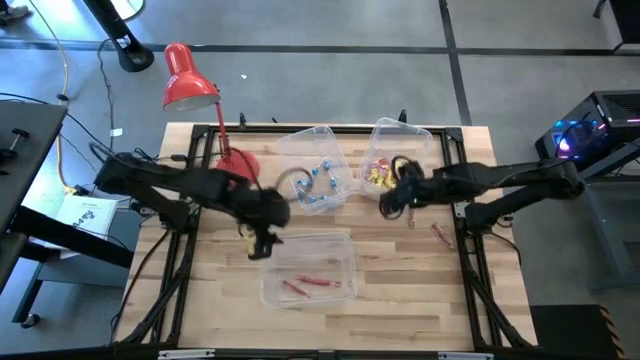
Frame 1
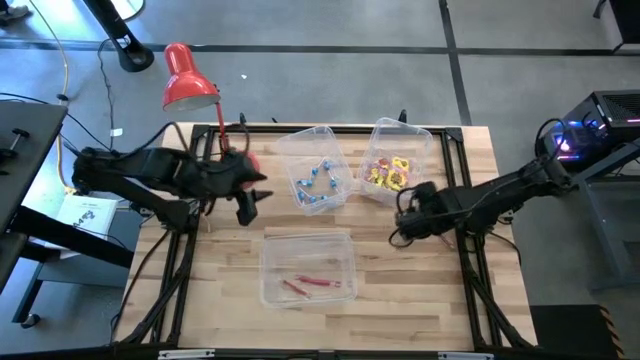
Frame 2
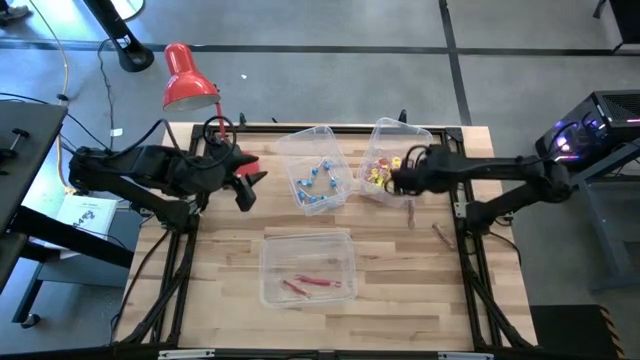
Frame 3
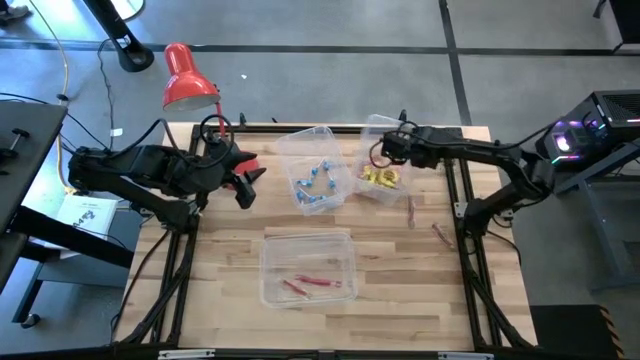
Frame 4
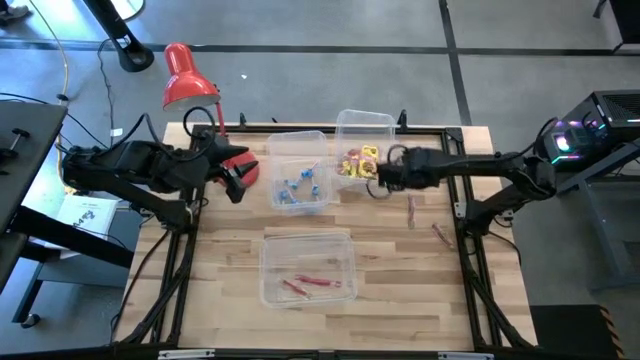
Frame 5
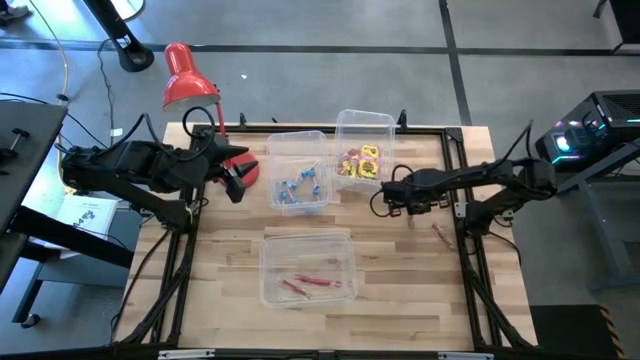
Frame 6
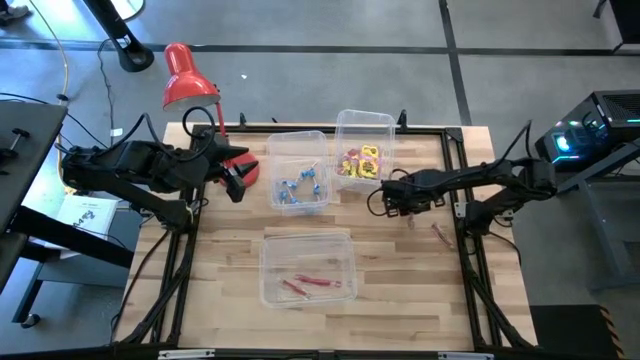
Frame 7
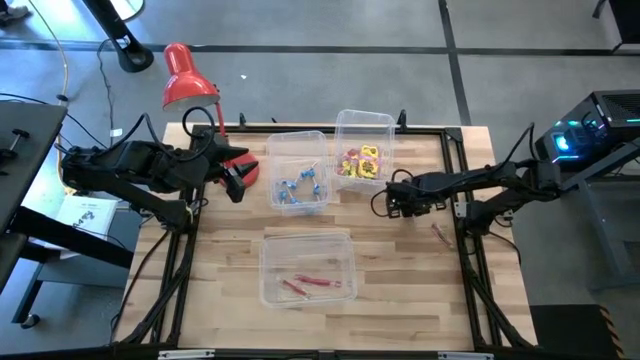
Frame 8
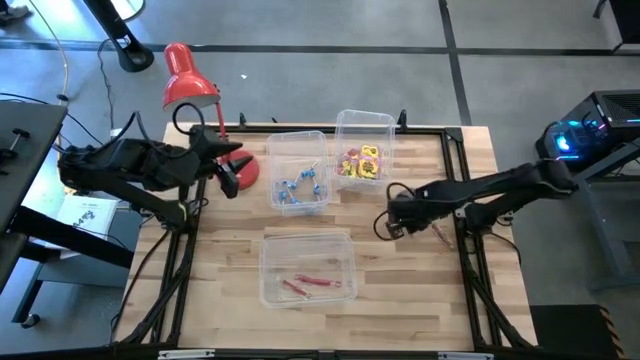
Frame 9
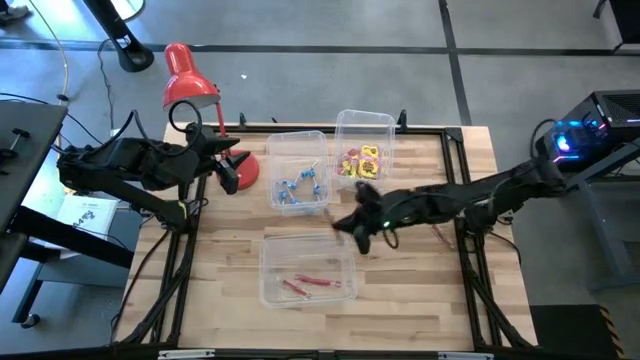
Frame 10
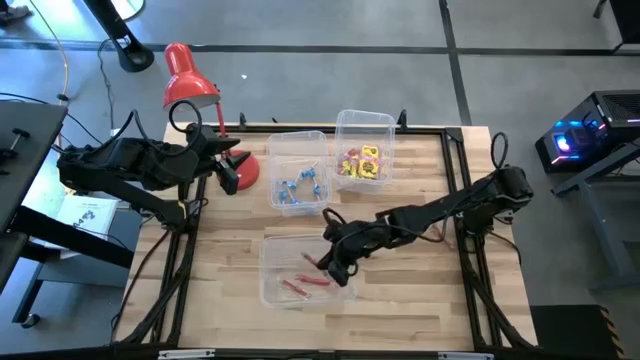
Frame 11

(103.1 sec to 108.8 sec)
Task: Sort candy
Put the red gummy into the bottom transparent bin

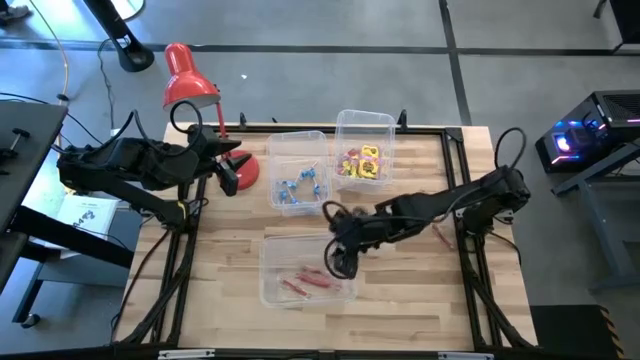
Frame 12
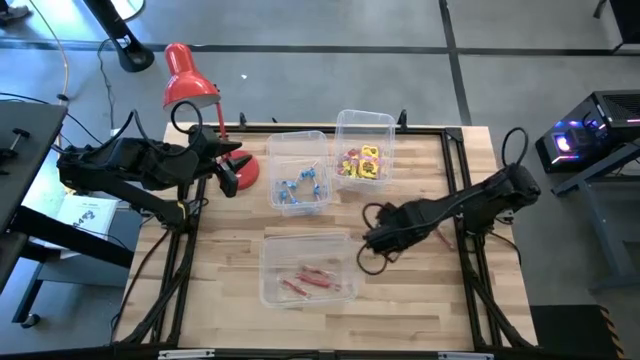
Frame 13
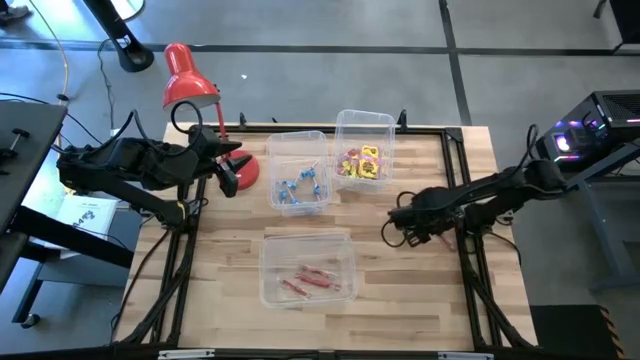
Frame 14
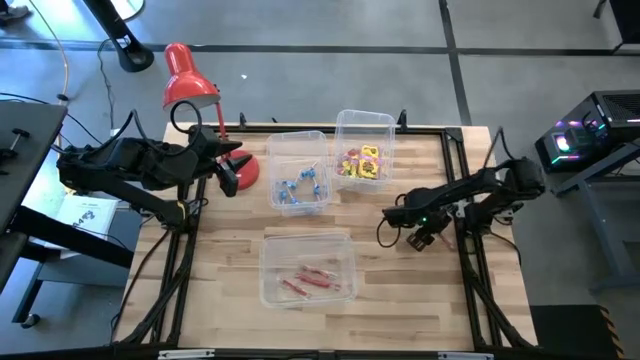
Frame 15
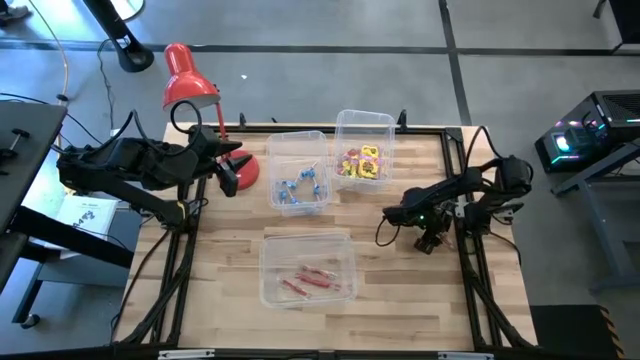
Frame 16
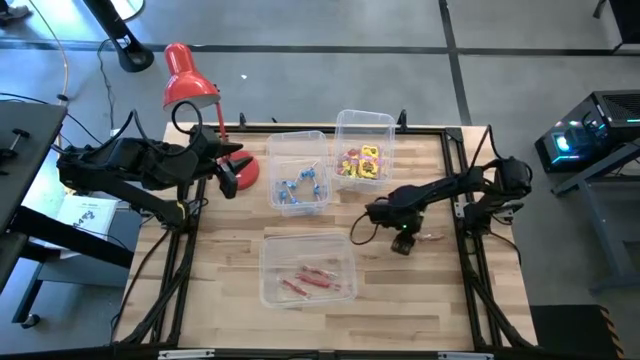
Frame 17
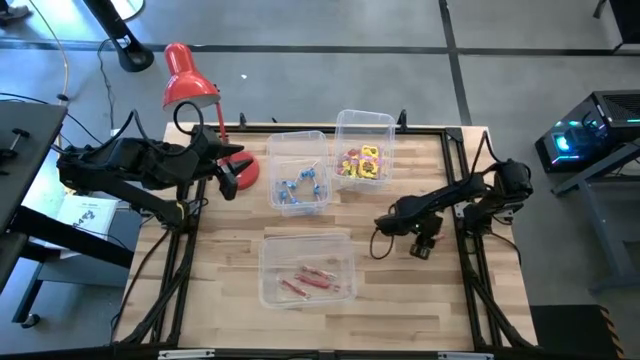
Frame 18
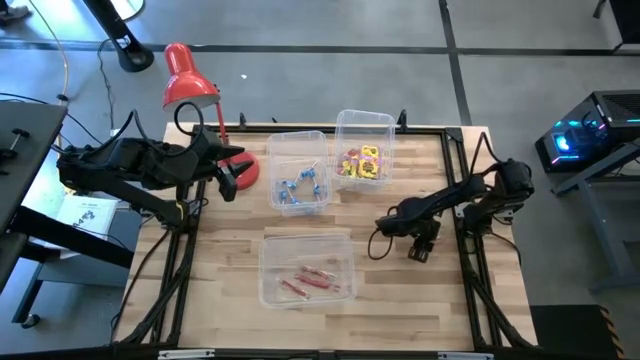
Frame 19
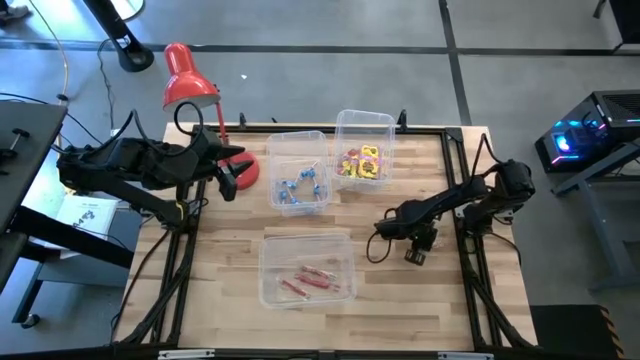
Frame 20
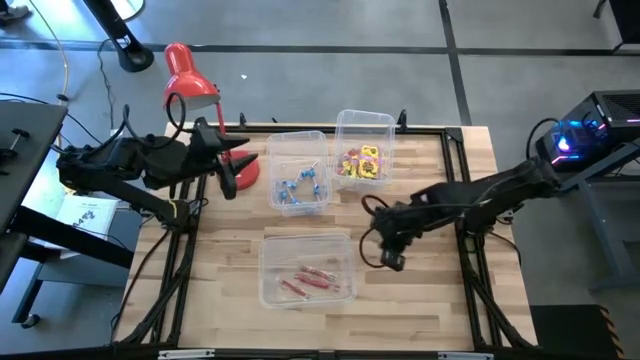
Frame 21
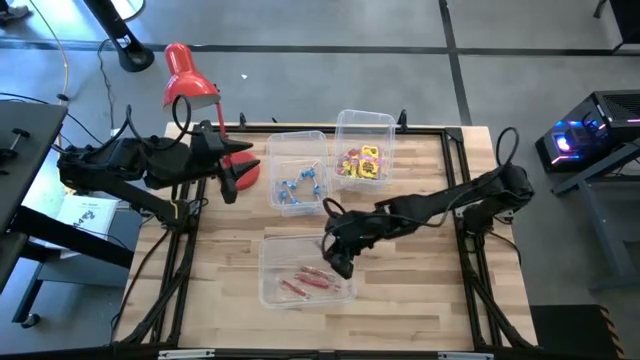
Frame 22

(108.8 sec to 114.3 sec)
Put the red gummy into the bottom transparent bin

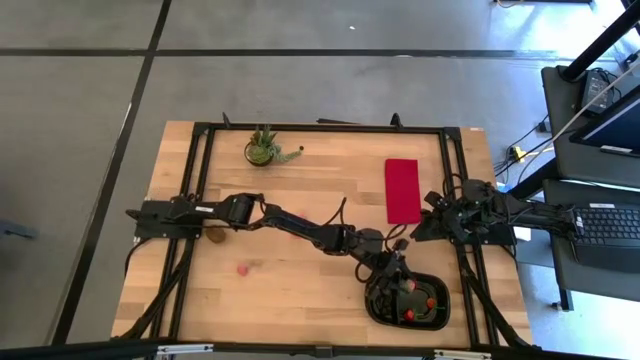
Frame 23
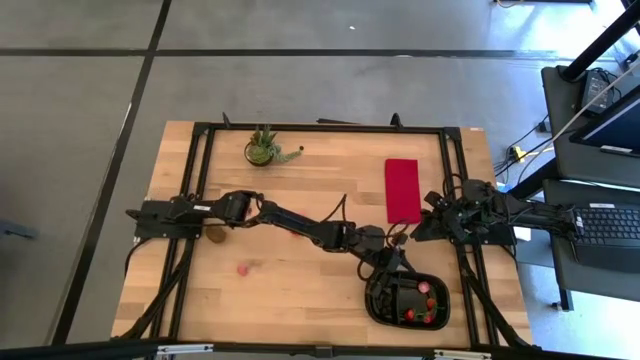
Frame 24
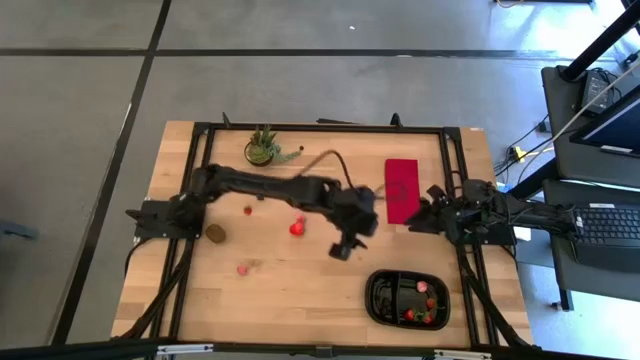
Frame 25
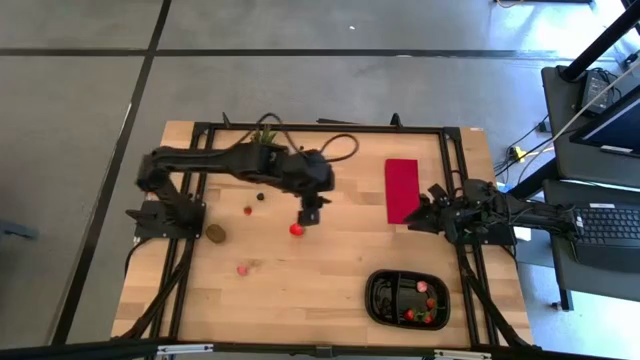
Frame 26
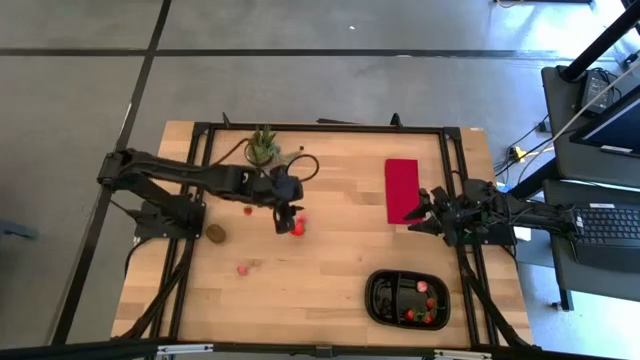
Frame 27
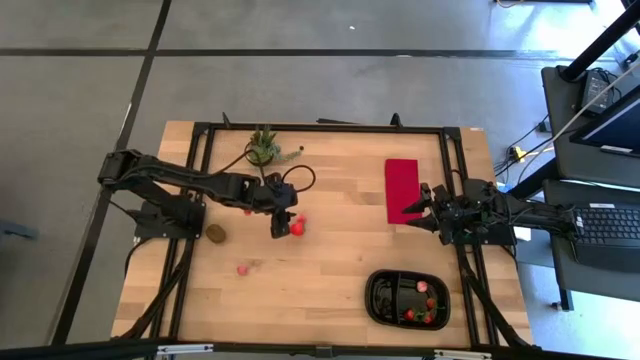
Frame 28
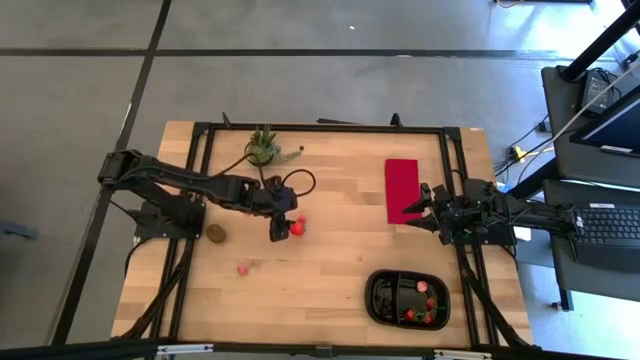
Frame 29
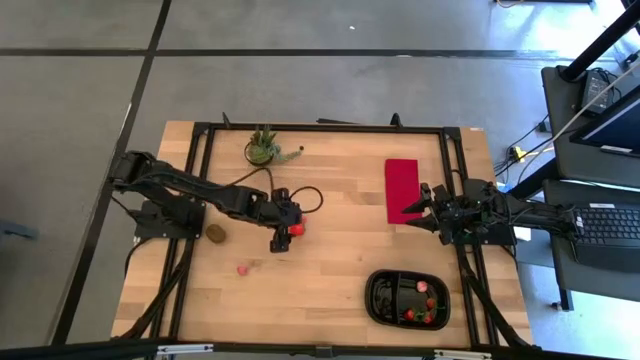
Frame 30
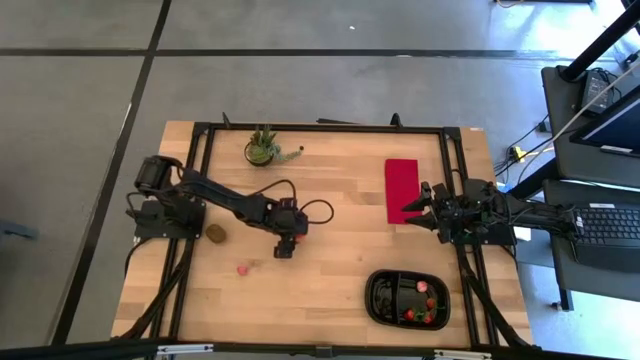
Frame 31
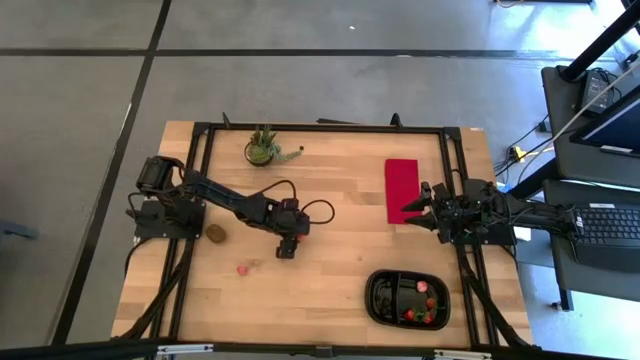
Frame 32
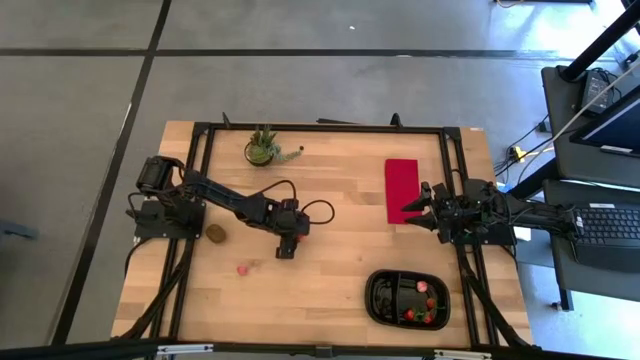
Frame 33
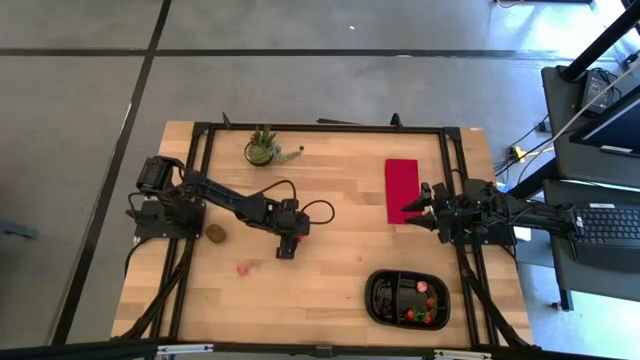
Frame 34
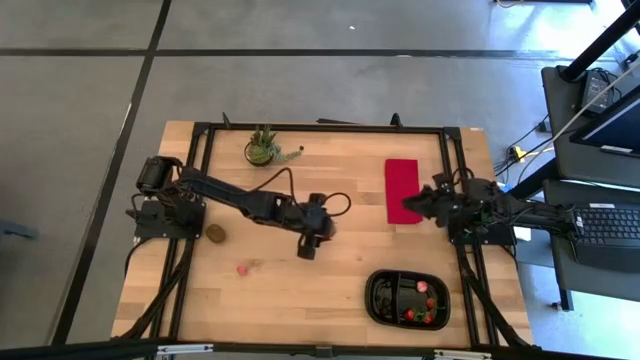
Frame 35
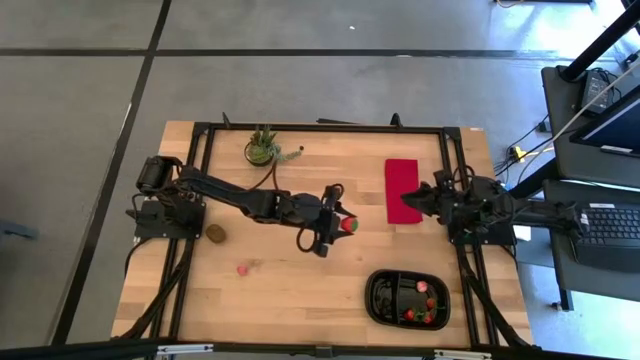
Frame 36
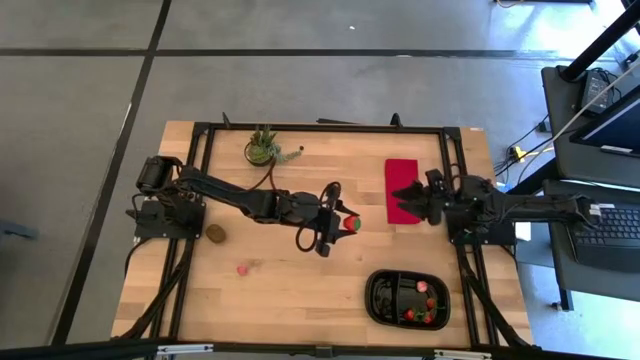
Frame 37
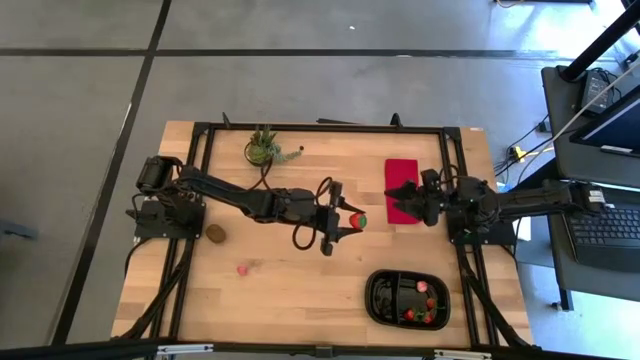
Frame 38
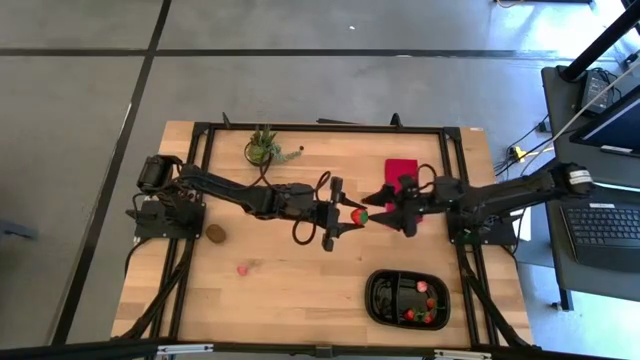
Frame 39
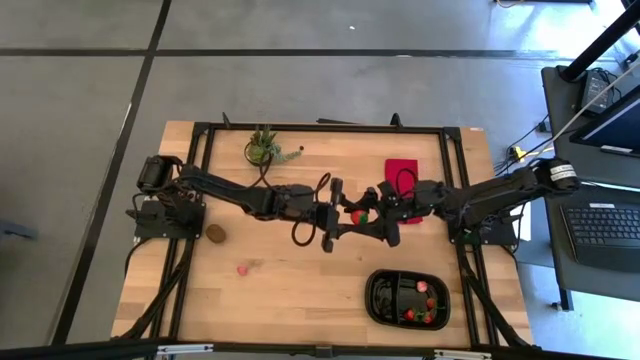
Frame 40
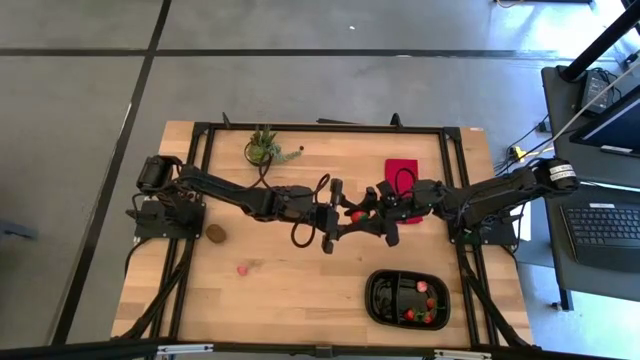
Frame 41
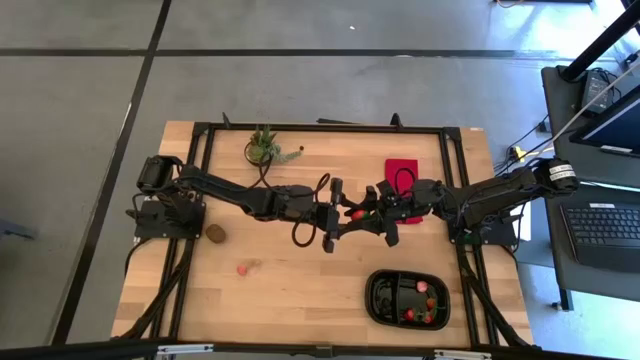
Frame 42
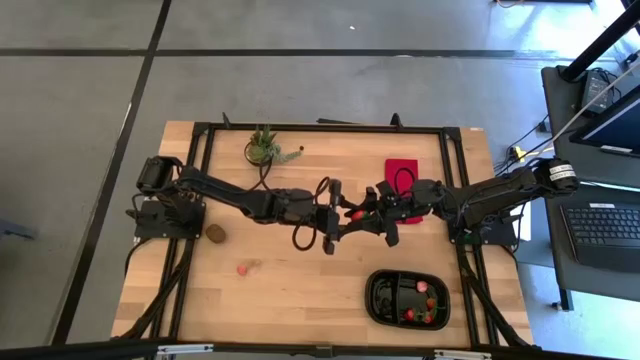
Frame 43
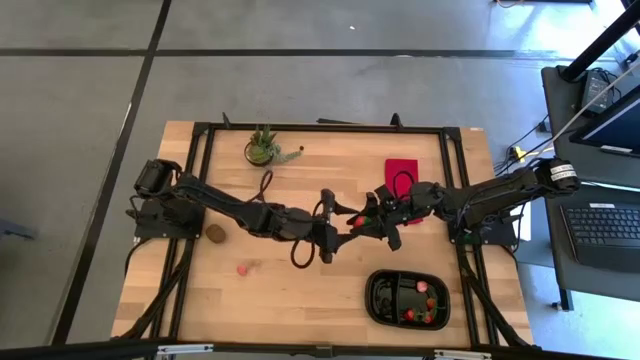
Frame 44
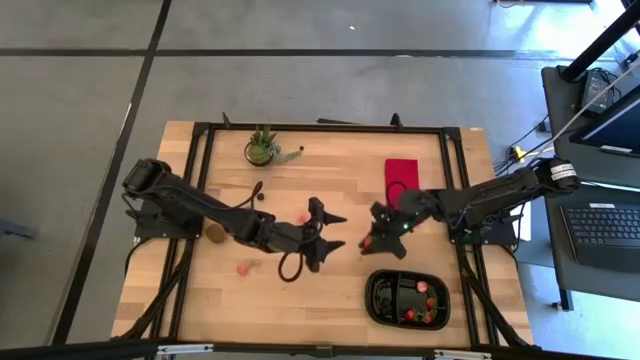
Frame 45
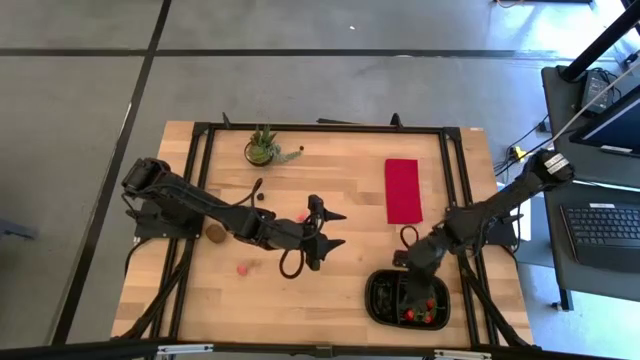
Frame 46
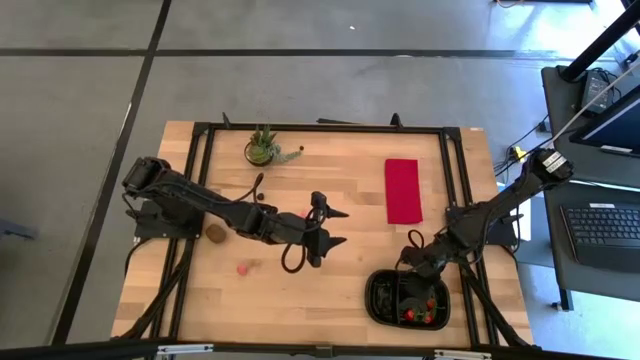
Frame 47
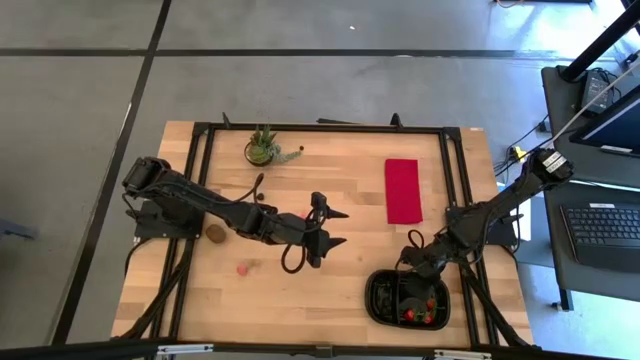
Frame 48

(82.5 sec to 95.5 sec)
Task: Pick and placing Produce into tupperware
Put the strawberry into the right of the black bin
